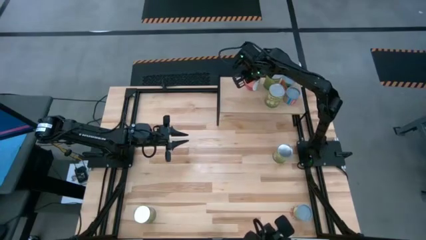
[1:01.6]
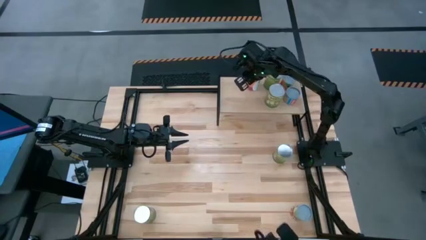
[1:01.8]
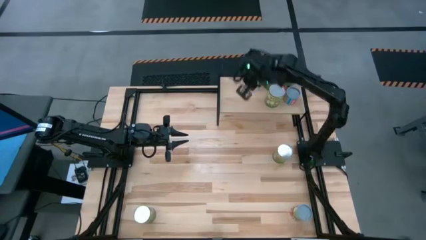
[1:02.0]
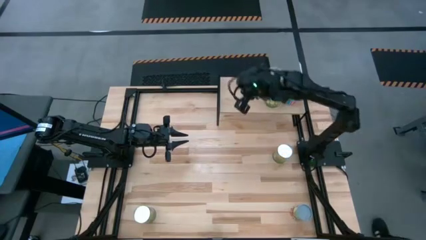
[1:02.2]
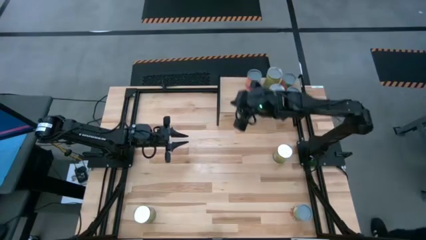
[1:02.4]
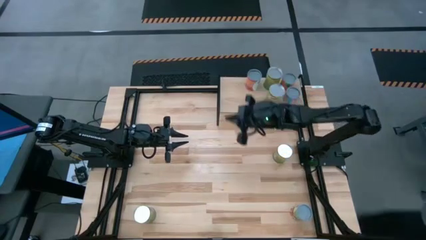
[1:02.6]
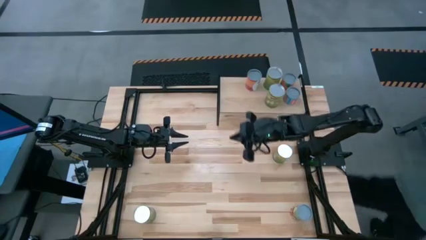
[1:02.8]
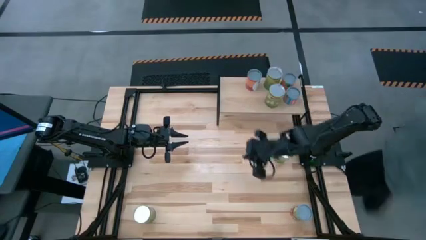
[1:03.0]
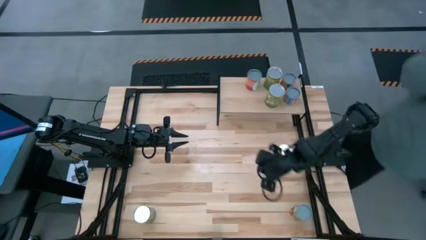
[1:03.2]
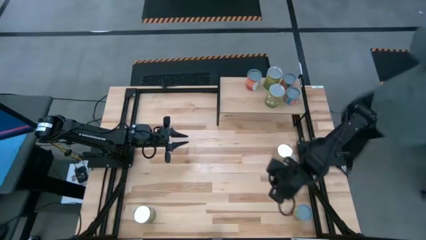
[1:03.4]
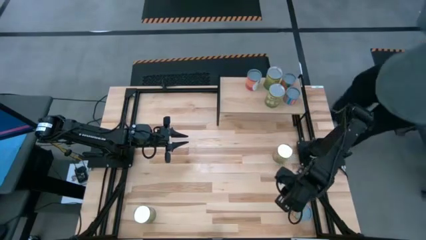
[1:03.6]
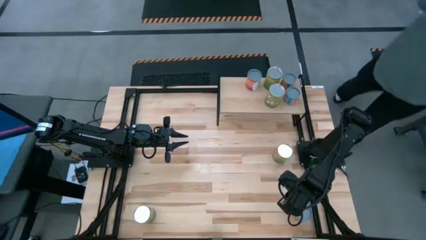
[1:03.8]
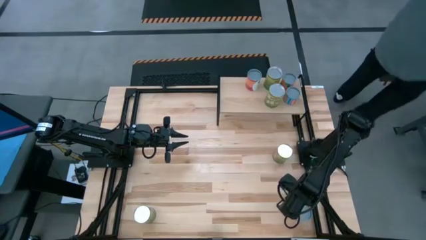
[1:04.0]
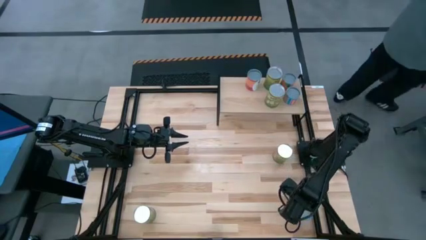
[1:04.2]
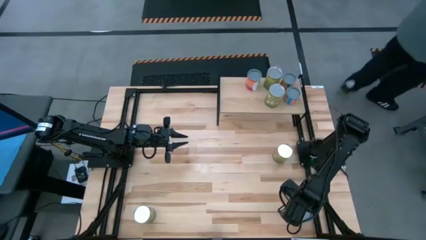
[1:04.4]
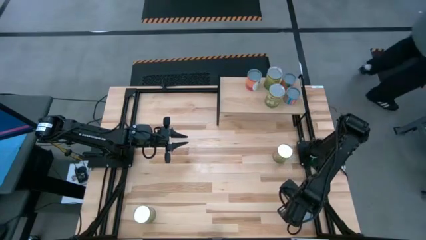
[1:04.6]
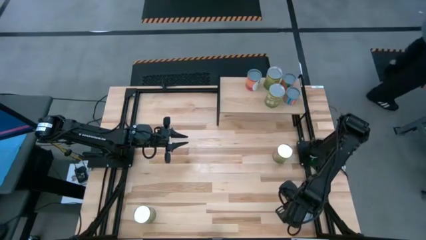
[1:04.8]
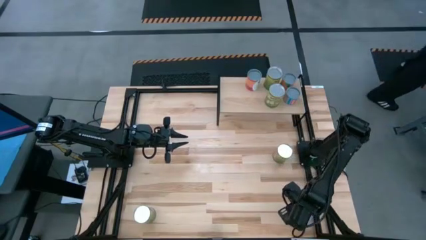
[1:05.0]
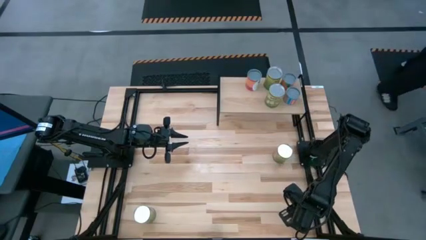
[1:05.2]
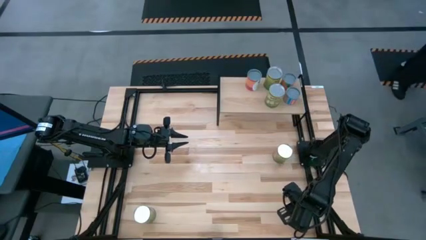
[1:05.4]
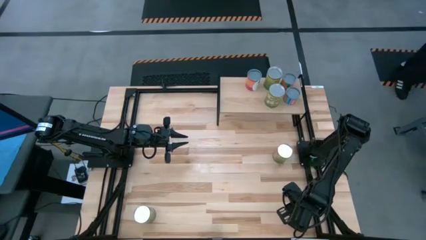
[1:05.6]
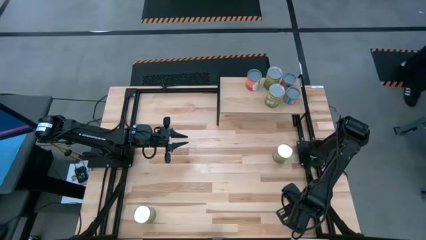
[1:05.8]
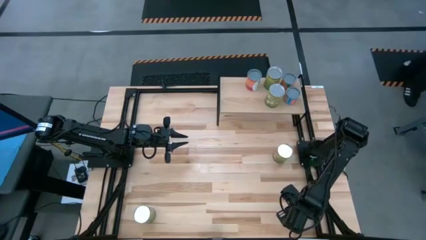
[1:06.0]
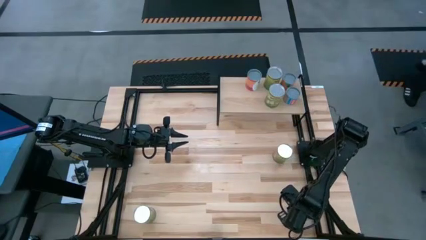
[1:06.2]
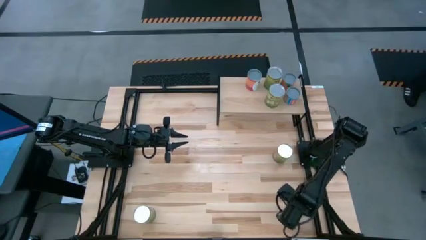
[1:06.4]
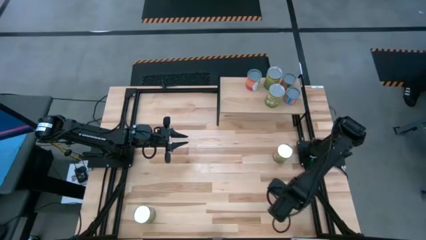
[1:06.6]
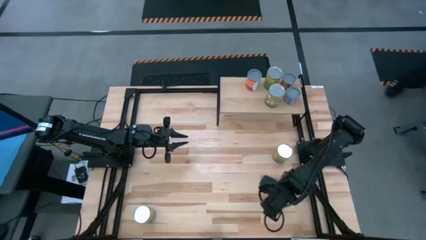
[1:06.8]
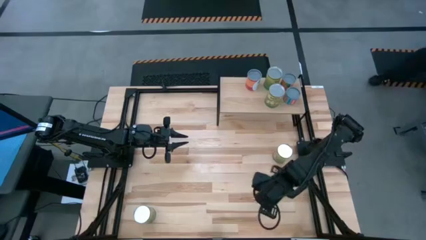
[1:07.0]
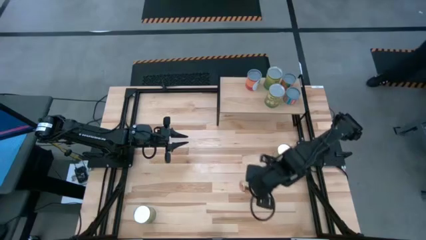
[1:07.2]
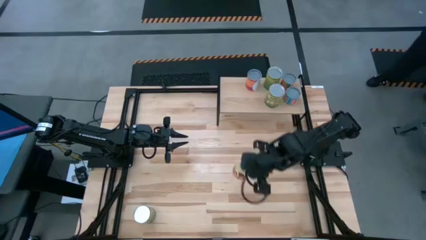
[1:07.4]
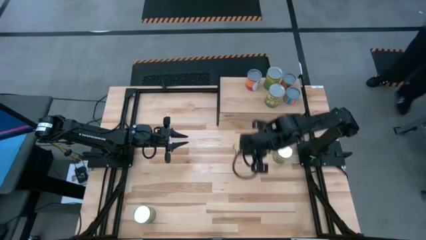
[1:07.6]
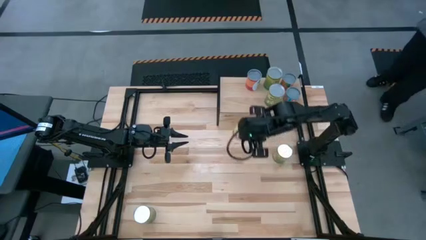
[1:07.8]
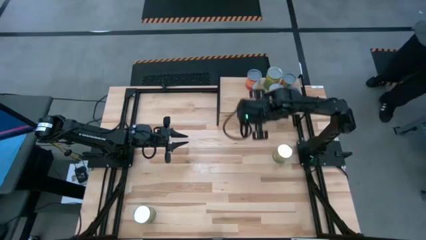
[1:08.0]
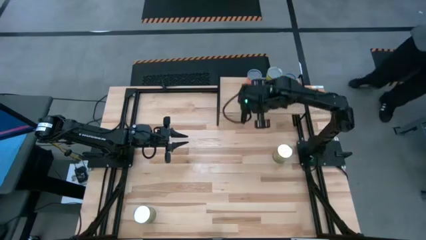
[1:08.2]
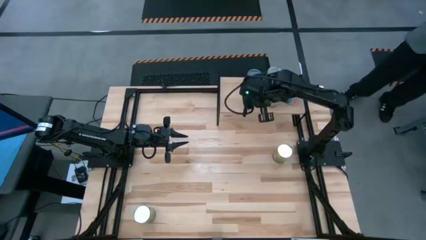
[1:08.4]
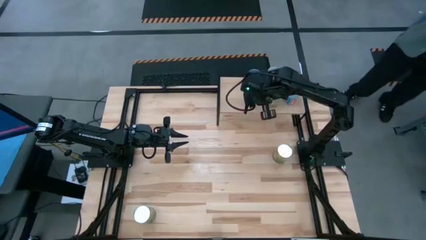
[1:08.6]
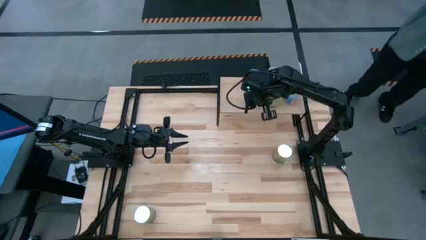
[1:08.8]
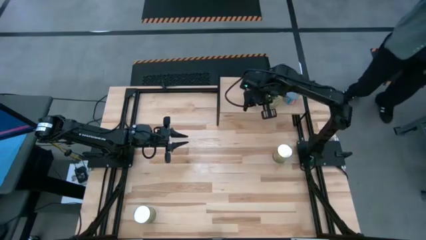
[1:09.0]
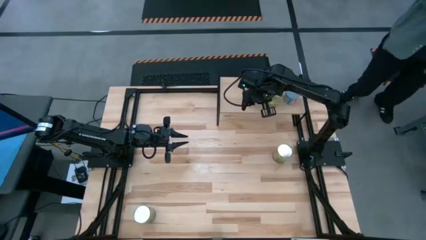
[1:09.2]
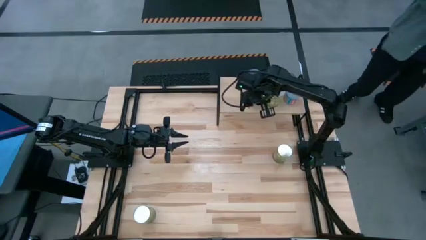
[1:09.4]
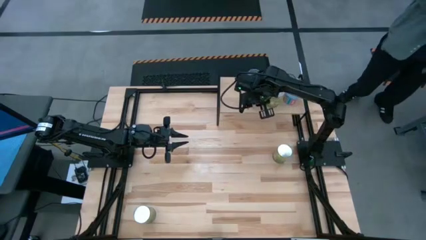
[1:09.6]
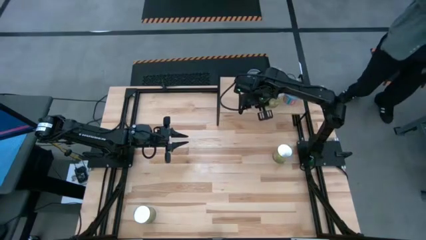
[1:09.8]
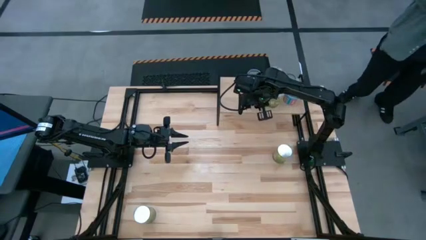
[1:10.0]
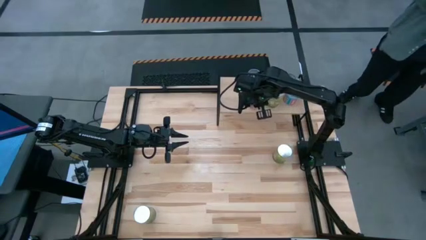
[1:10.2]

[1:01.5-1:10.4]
Task: Pick and place cans onto a shelf
Put the canned spaghetti sauce on the shelf and aligned with the canned mixed fruits

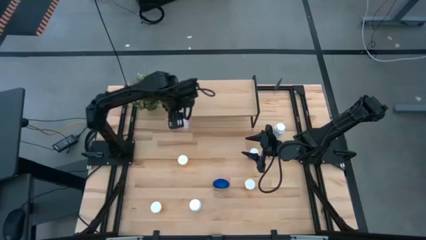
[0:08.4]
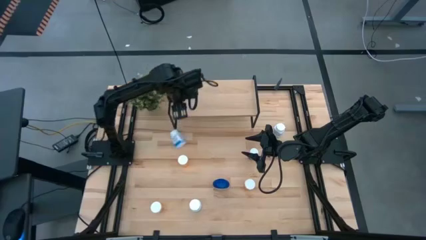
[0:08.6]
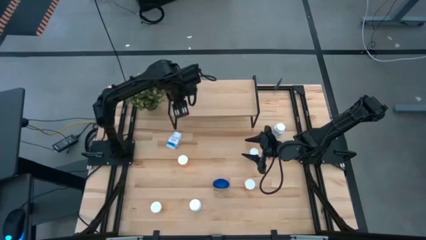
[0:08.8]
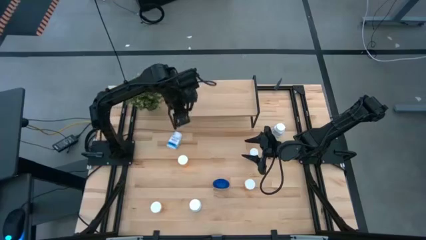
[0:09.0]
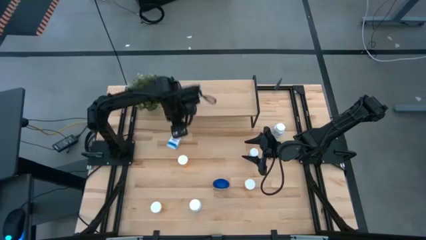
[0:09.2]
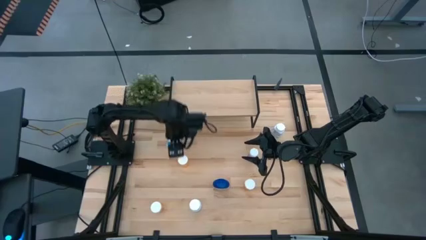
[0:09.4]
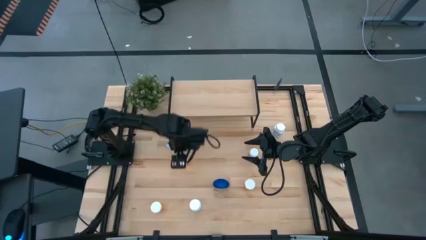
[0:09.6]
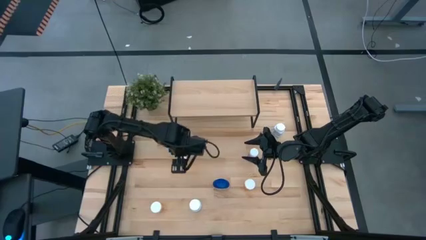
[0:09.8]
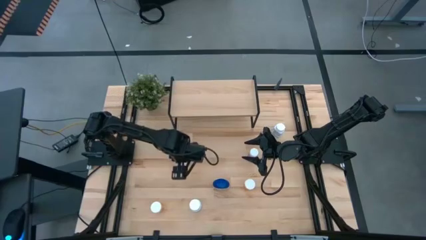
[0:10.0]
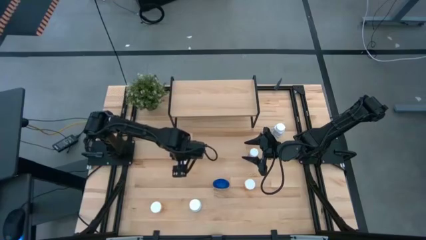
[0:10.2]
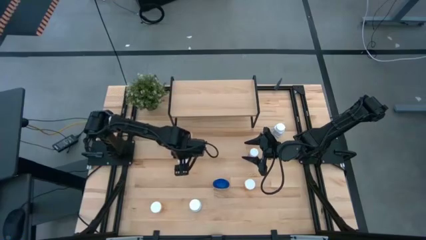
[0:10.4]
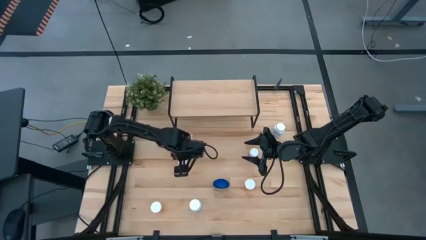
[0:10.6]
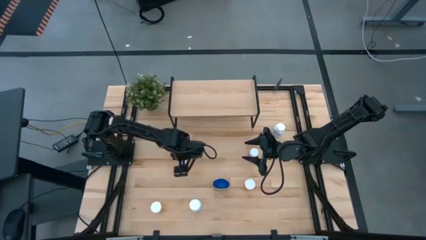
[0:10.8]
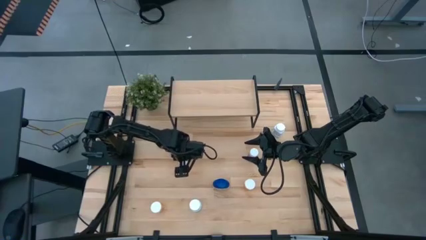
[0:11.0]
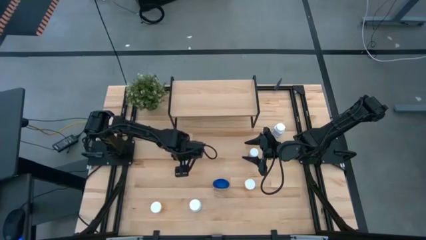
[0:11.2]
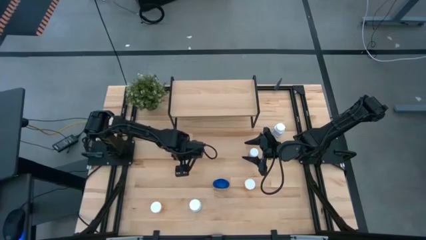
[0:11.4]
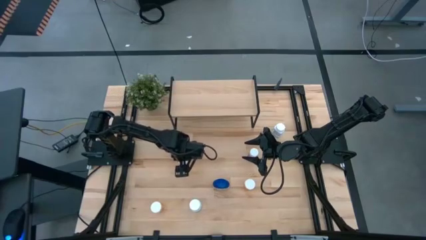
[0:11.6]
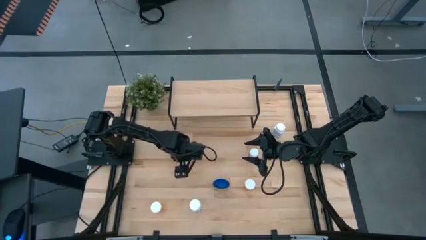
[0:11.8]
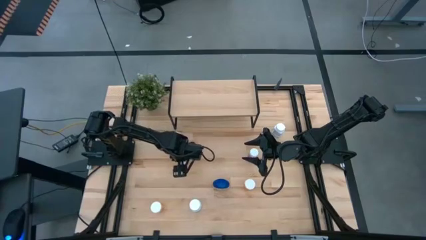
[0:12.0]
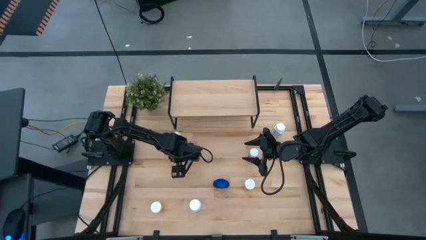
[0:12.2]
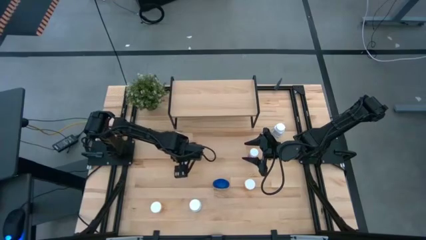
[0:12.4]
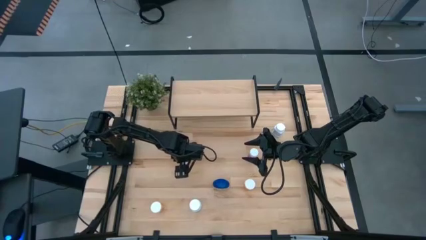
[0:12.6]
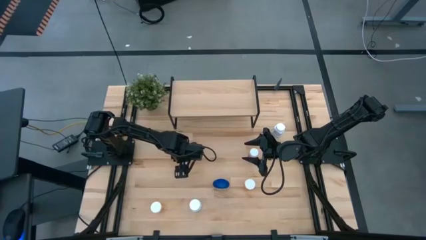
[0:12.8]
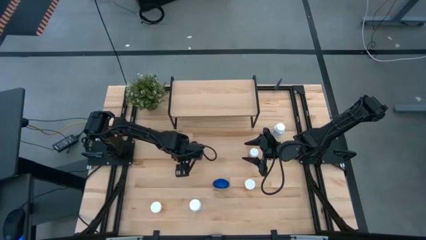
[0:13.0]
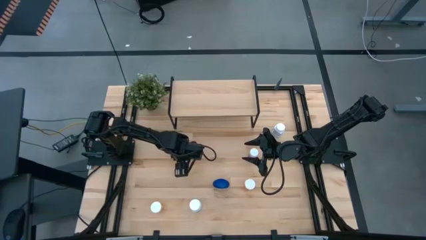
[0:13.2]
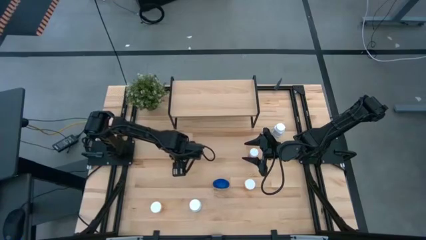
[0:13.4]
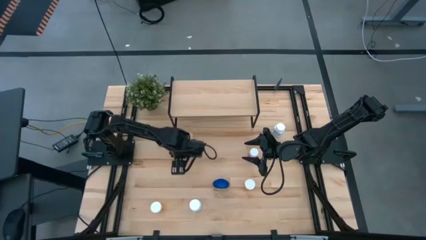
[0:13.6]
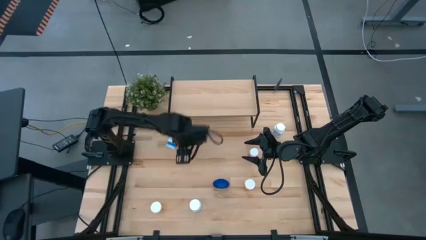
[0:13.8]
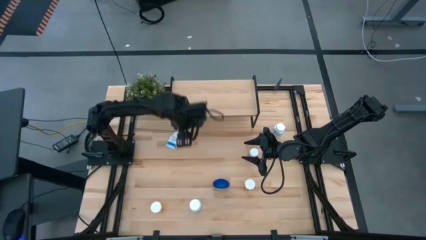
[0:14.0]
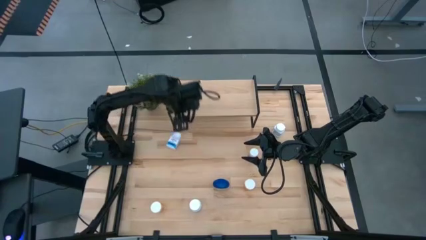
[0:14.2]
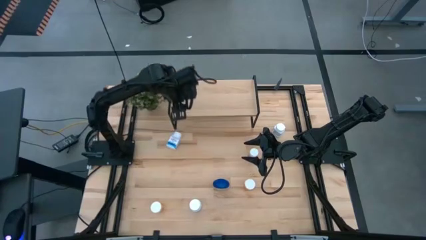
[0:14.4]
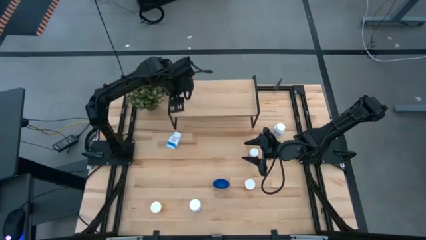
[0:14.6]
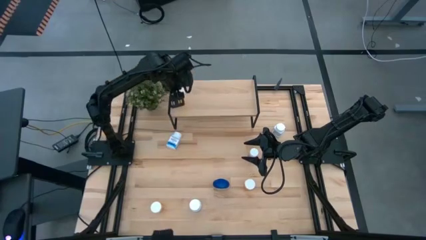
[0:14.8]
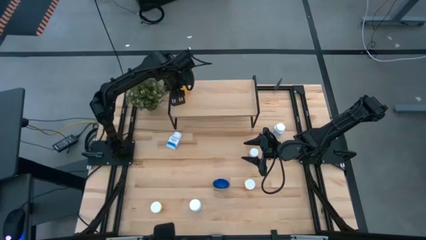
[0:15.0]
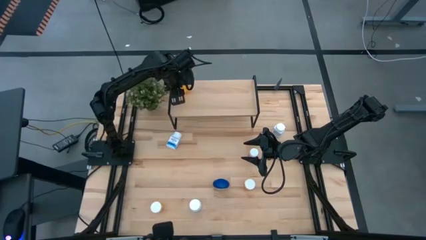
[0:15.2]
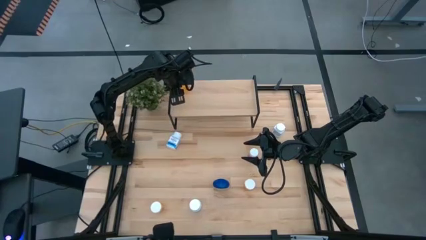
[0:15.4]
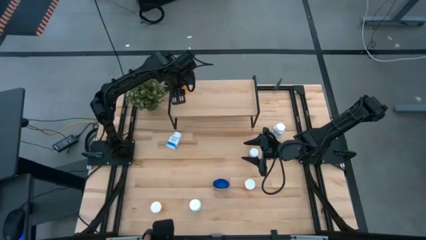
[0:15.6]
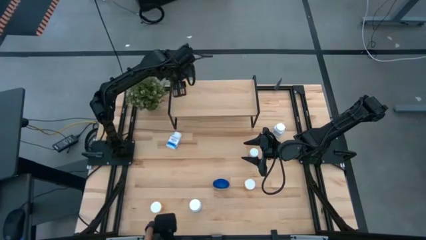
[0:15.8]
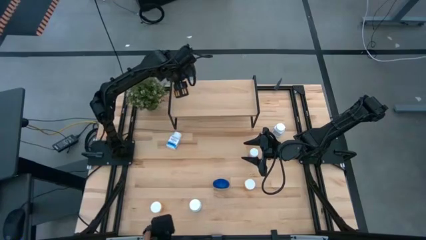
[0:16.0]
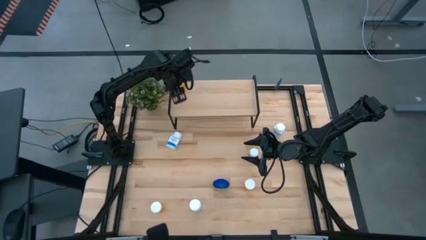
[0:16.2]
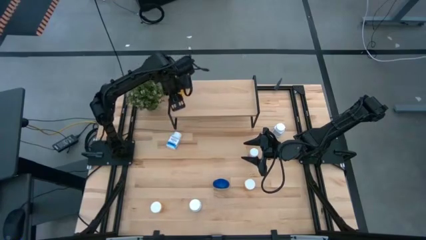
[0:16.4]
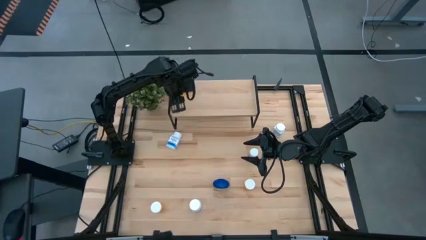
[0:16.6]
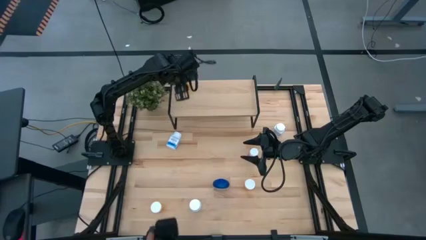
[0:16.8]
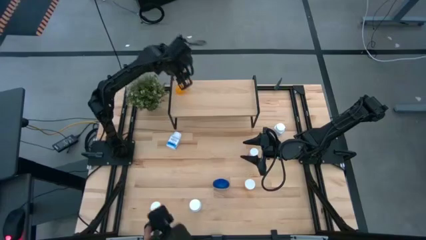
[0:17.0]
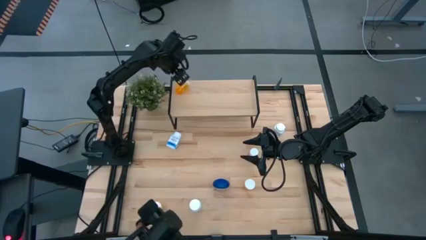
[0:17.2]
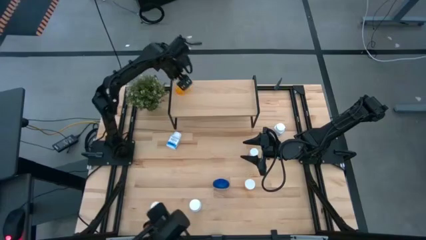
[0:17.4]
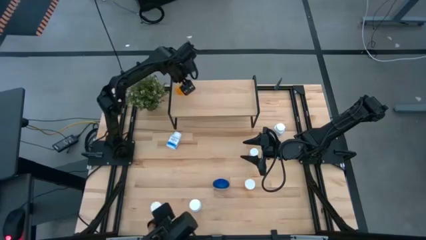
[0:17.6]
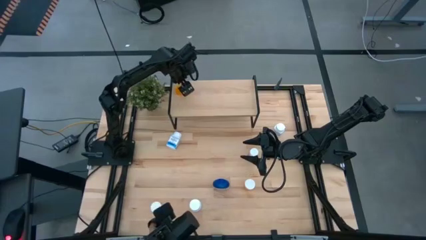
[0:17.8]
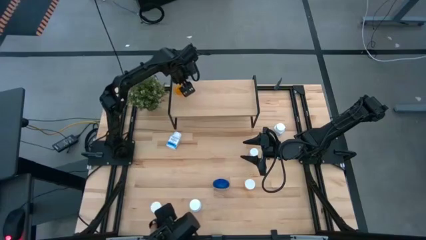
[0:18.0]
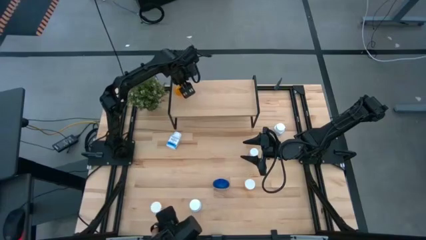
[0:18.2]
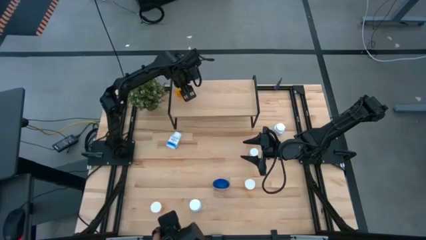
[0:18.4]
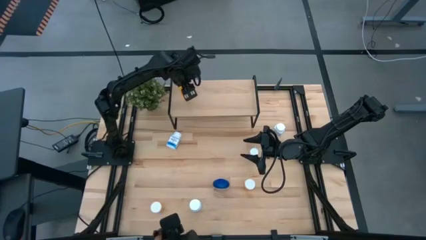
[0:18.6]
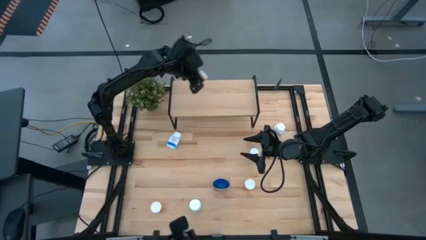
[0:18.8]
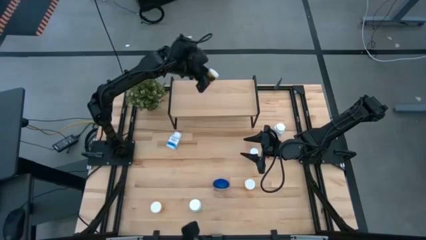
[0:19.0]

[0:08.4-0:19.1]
Task: Pick and place medicine bottles onto shelf by color
Put the top orange pill bottle on the shelf
